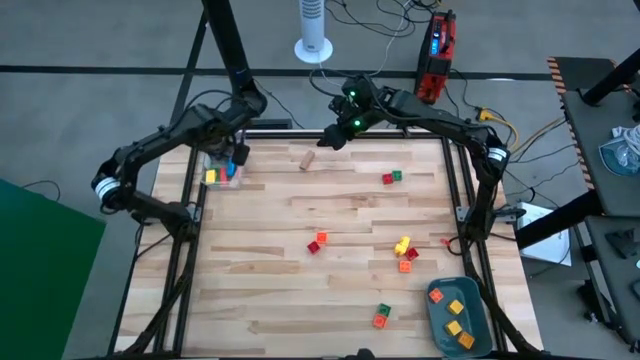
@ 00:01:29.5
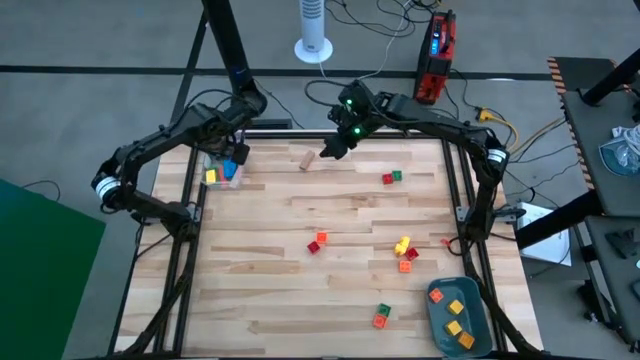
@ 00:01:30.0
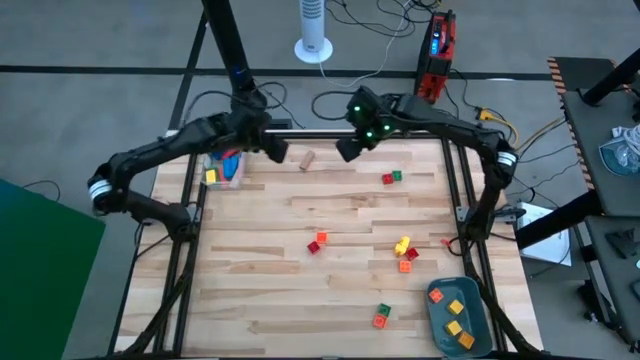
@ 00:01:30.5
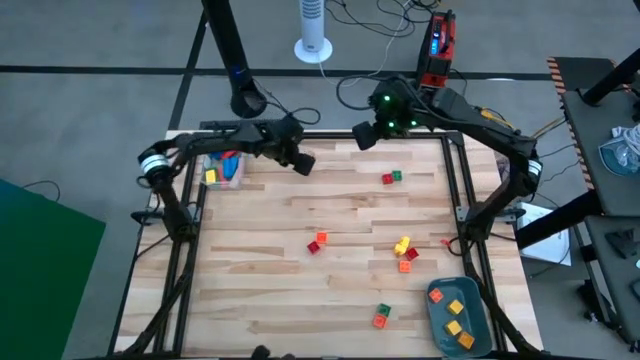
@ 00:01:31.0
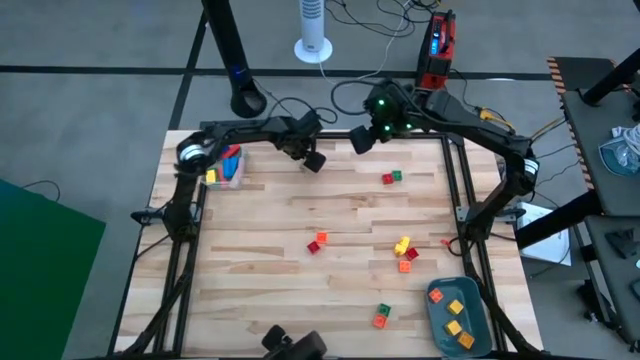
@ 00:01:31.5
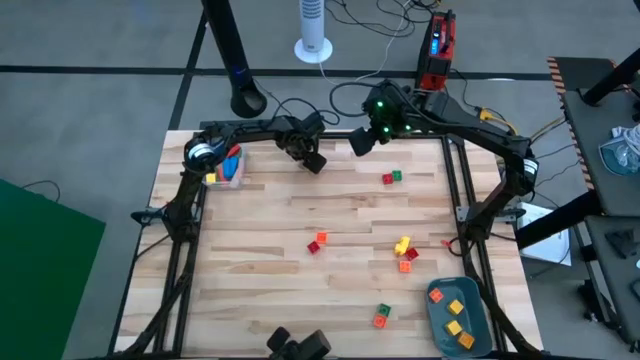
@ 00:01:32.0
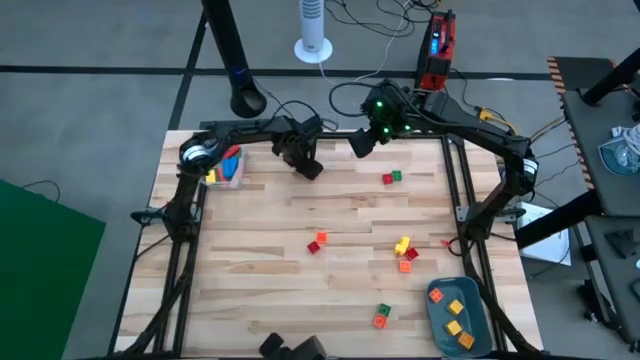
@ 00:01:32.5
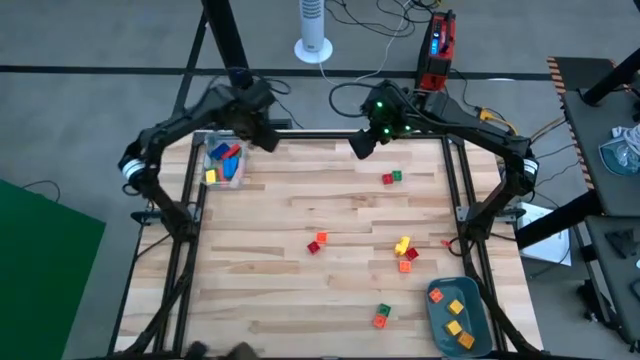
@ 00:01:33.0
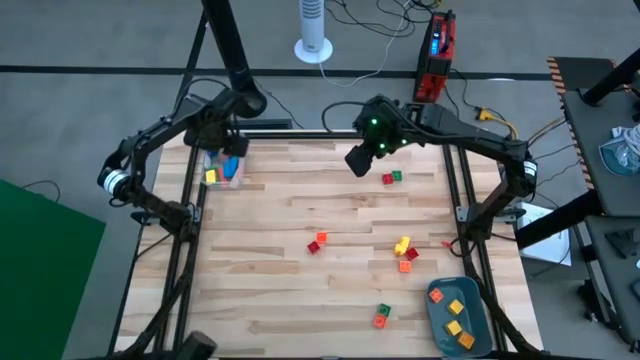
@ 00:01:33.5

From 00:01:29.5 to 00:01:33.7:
Task: Sort blocks by size
Put the brown rectangular wooden block into the transparent bin

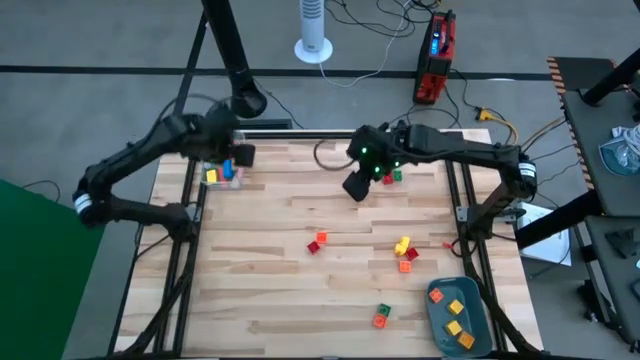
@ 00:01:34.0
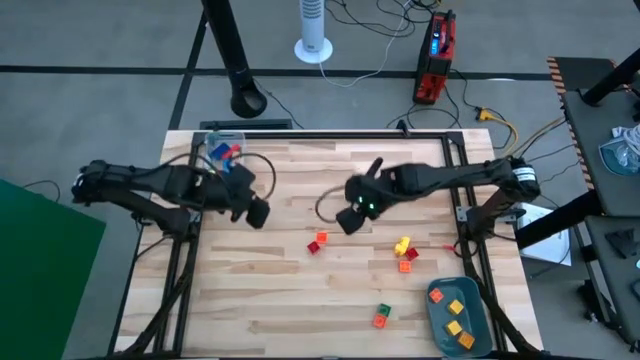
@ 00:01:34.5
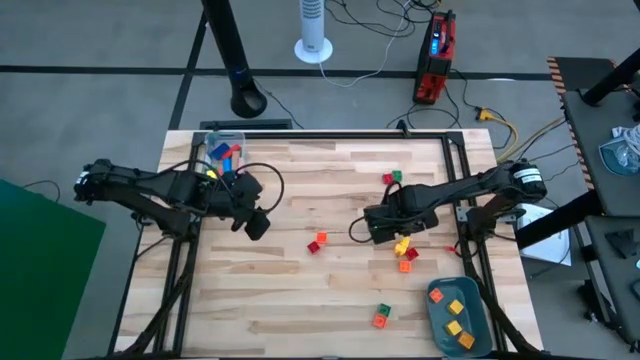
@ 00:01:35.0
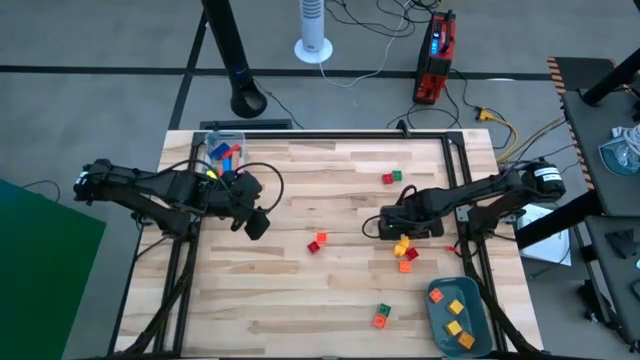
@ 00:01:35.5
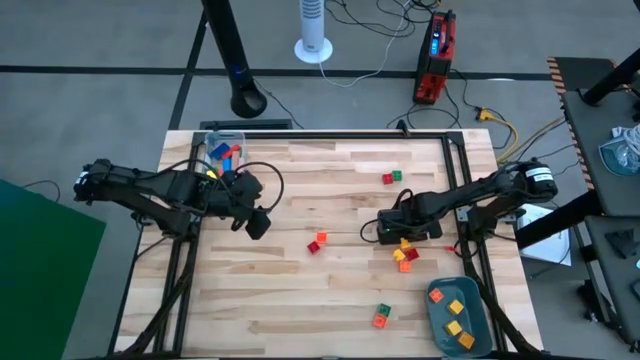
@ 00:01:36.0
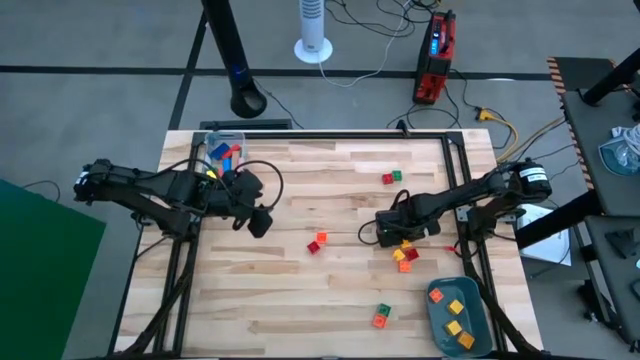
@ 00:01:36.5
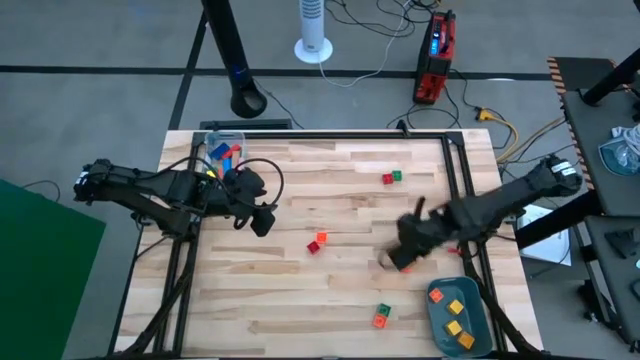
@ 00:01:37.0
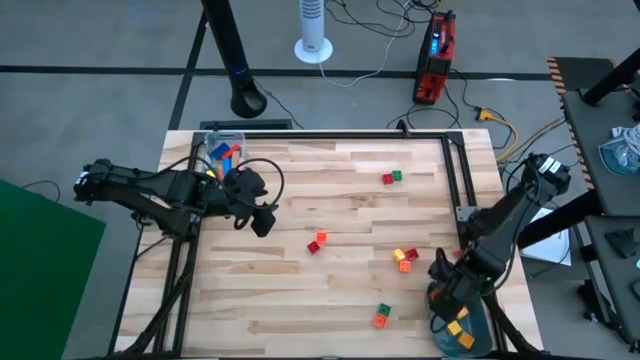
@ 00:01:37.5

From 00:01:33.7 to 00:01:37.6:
Put the yellow square game piece into the blue bin

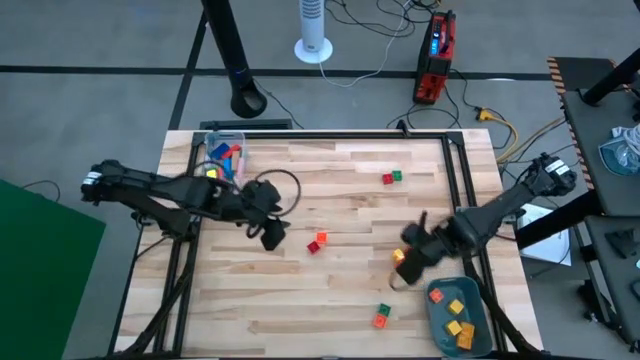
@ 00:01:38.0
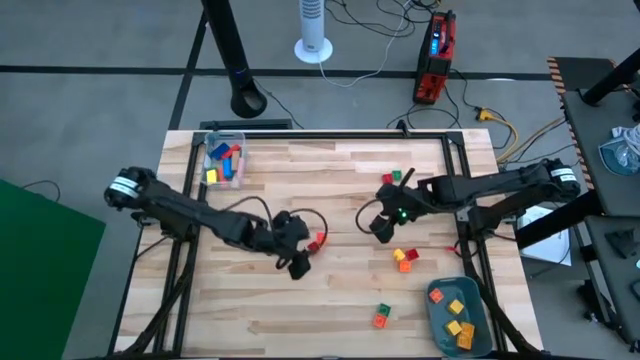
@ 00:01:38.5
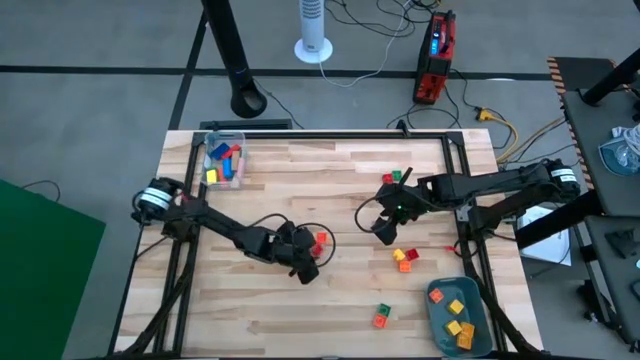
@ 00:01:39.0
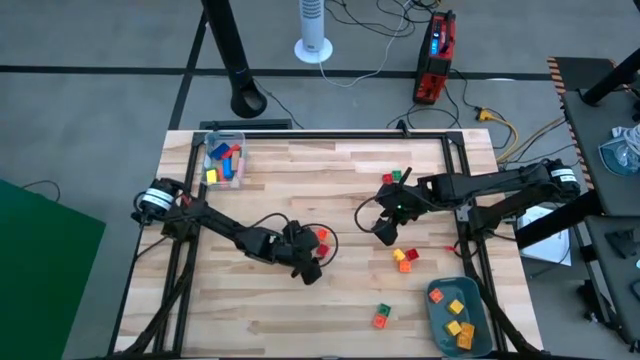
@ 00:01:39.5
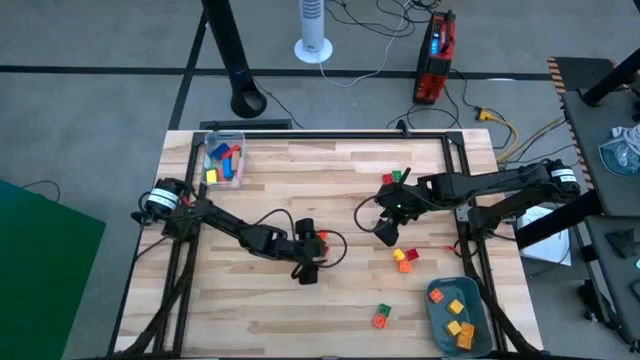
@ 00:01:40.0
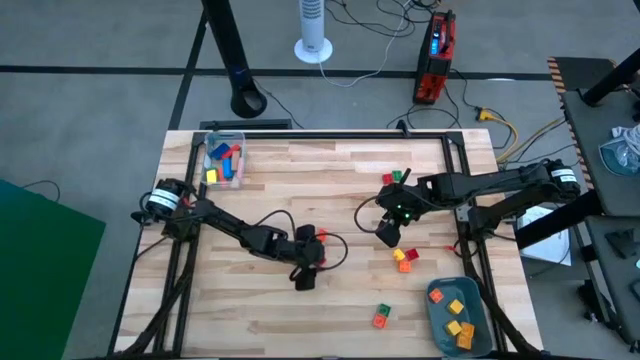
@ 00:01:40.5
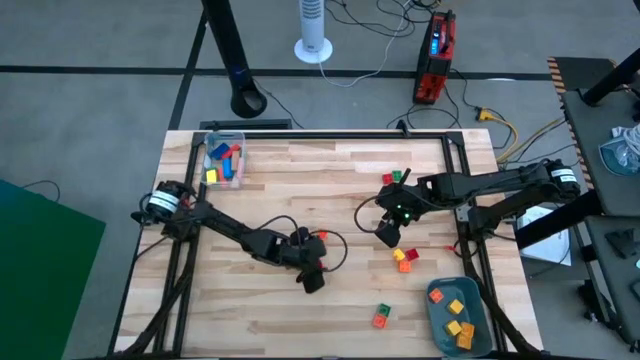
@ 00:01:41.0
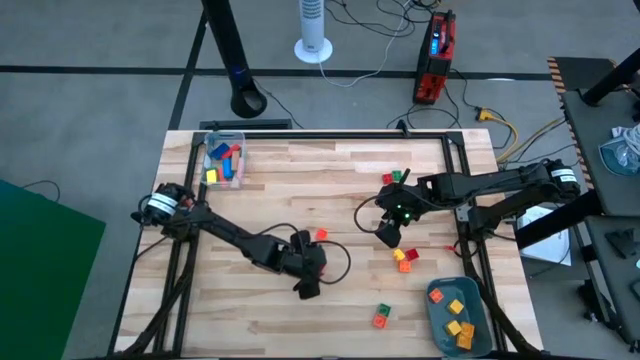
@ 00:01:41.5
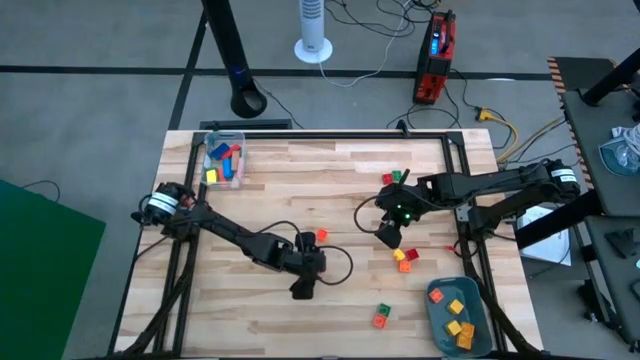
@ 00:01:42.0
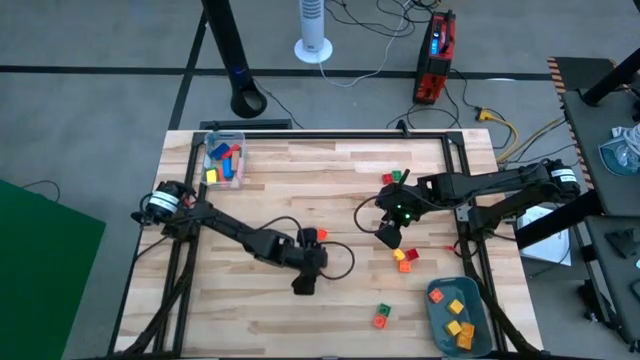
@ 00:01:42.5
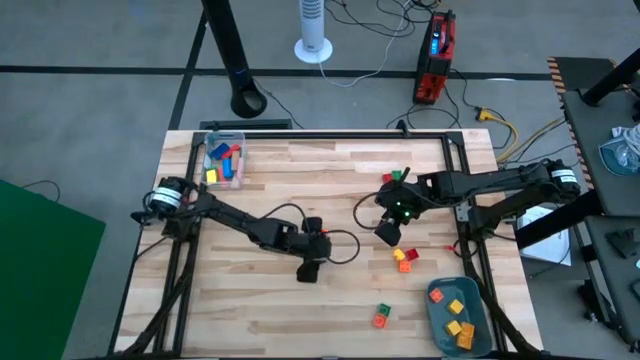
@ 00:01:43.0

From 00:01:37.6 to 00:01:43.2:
Put the red square game piece into the blue bin

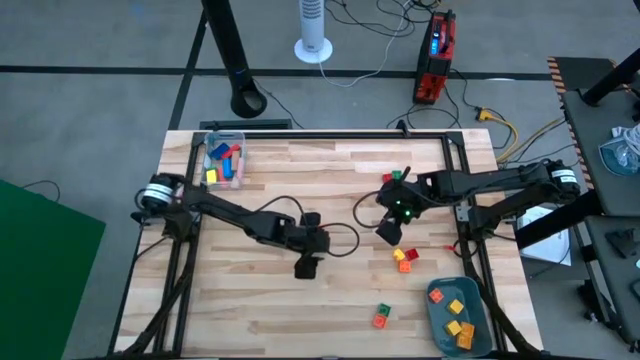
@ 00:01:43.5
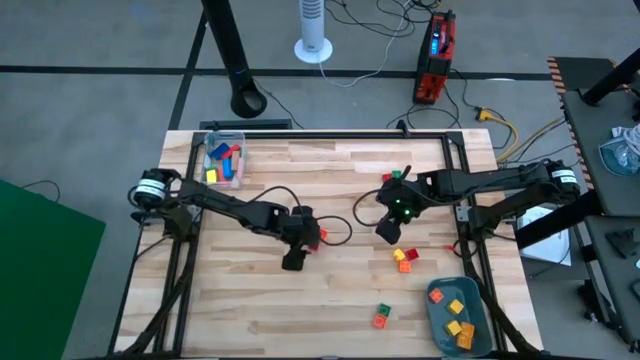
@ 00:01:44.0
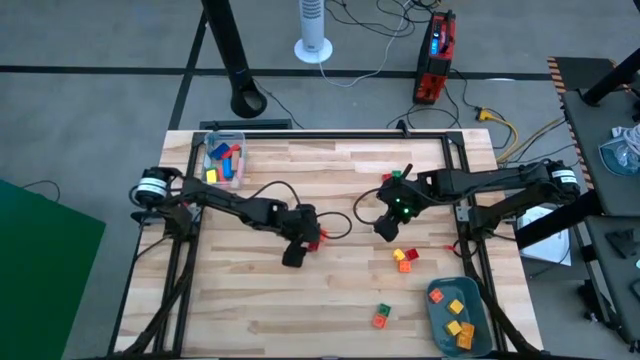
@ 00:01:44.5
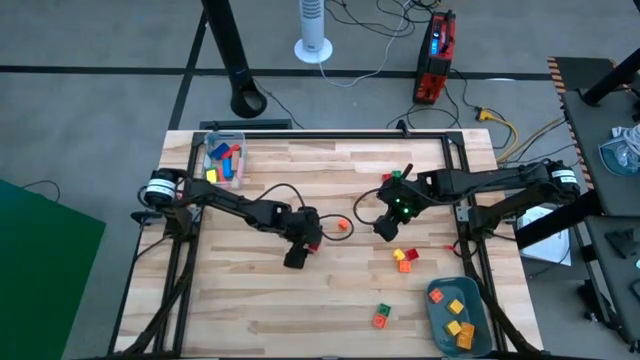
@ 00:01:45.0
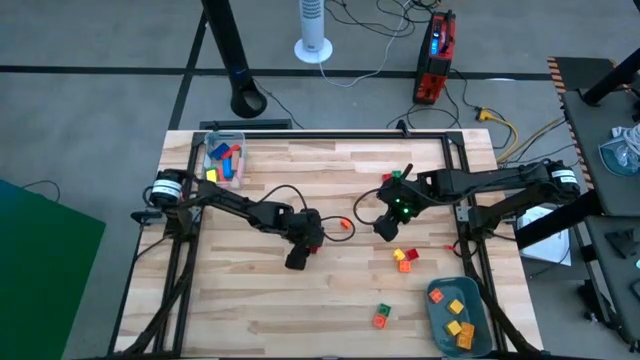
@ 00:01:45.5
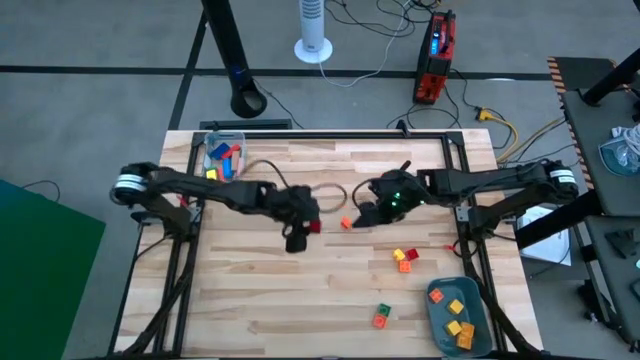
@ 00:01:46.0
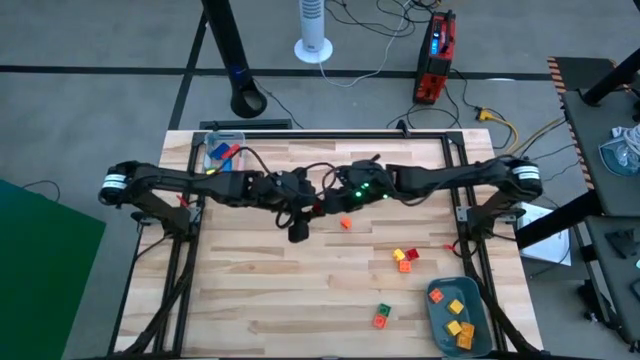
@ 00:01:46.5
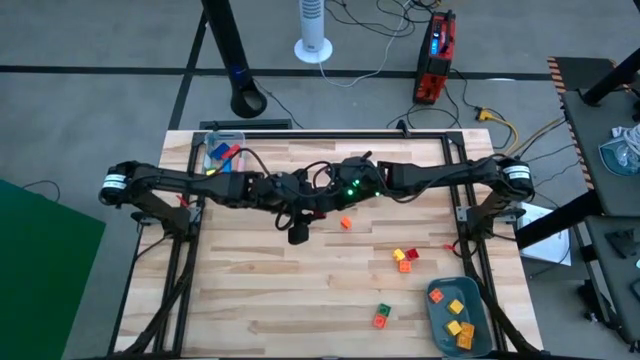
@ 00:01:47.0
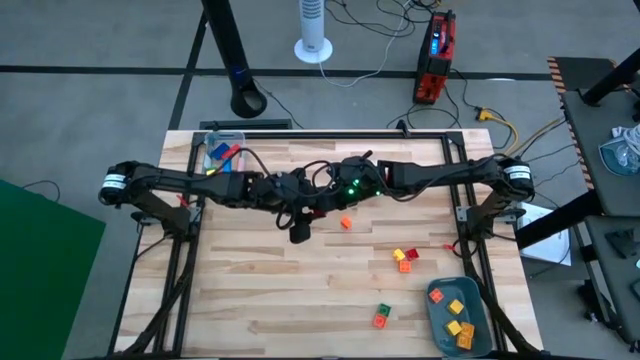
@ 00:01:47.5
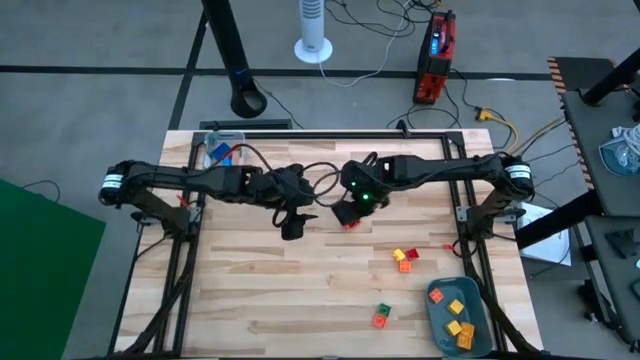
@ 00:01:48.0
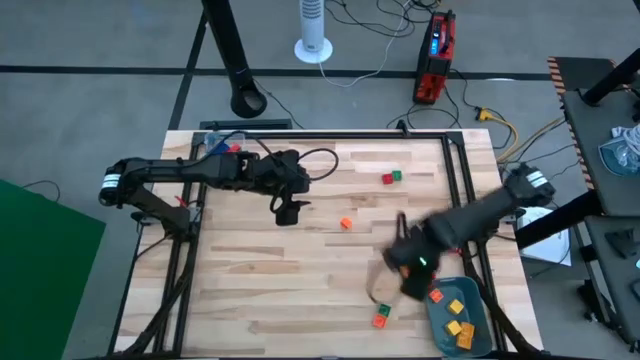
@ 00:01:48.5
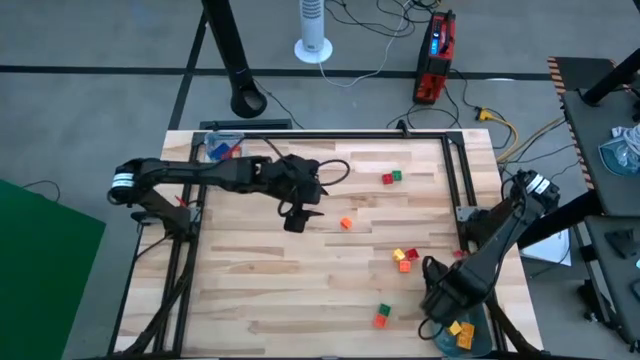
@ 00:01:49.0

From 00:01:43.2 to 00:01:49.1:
Put the red square game piece into the blue bin

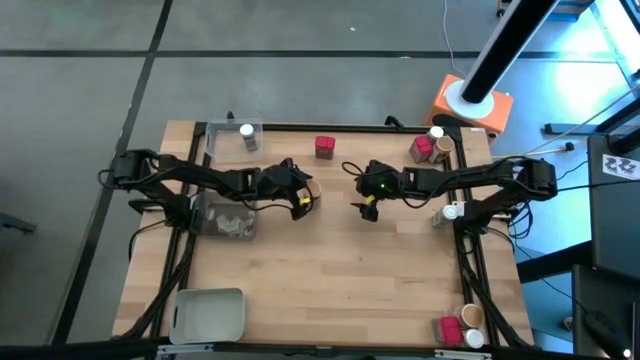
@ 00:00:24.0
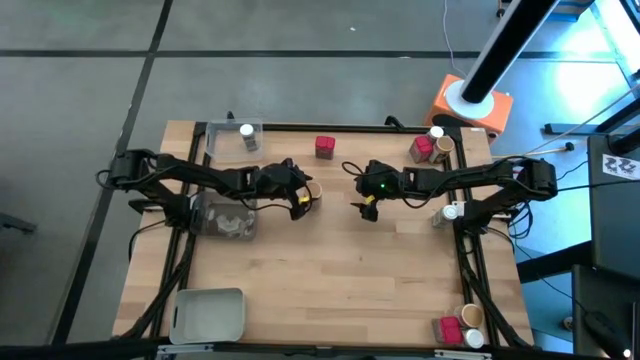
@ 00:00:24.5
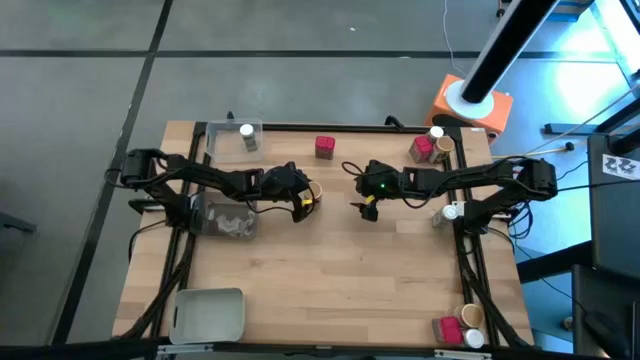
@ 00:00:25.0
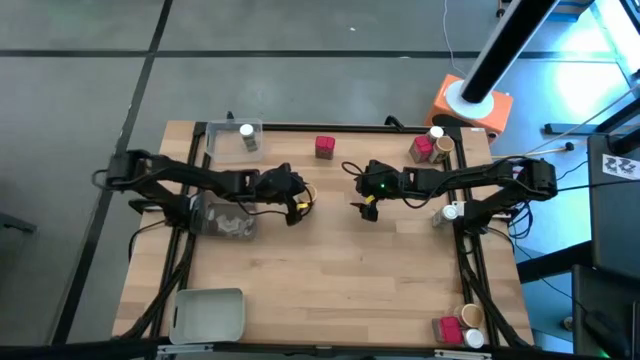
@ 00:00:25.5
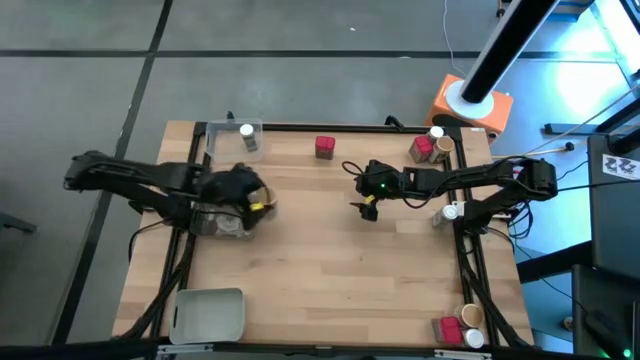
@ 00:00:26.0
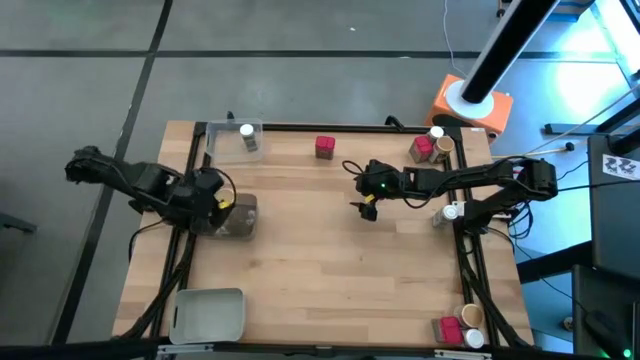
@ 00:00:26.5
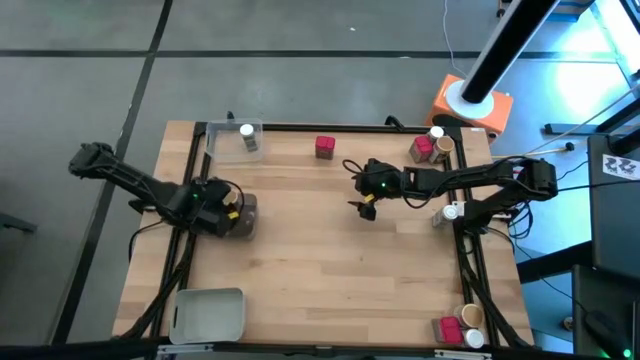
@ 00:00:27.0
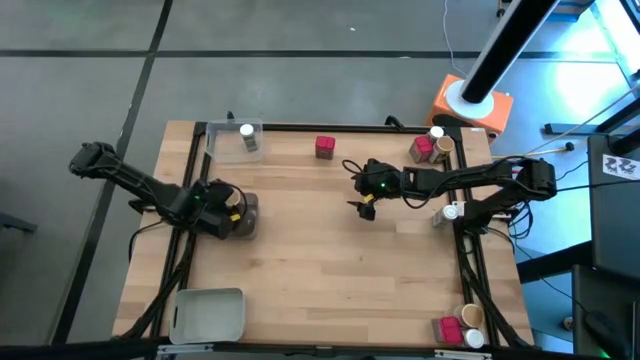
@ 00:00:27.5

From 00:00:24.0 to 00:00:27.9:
Task: Sort spices by type
Put the top left brown spice bottle into the black bin
